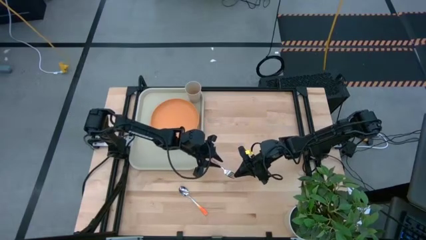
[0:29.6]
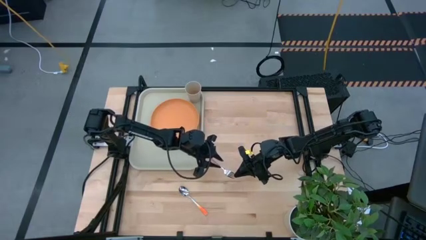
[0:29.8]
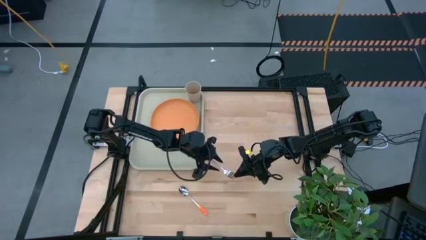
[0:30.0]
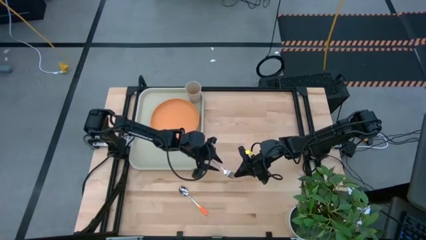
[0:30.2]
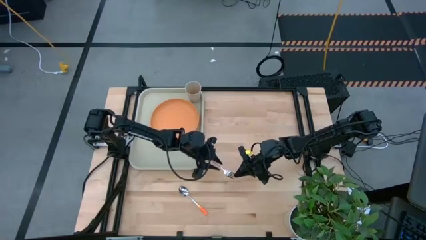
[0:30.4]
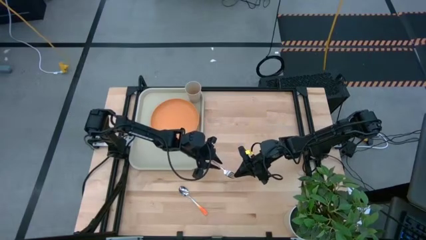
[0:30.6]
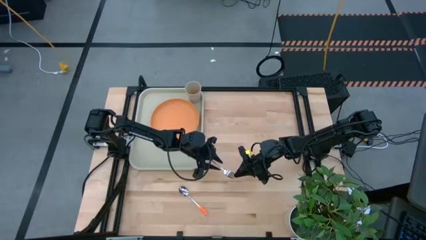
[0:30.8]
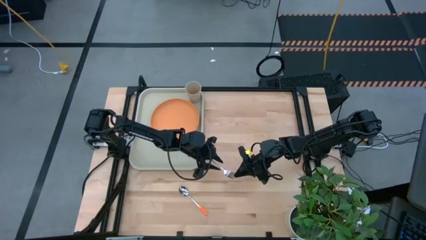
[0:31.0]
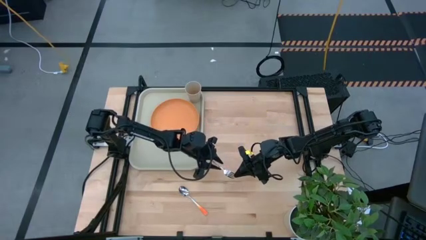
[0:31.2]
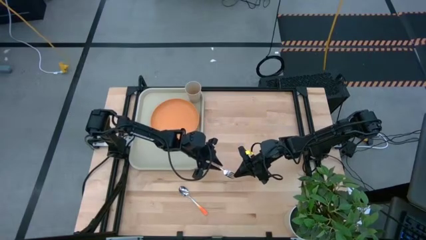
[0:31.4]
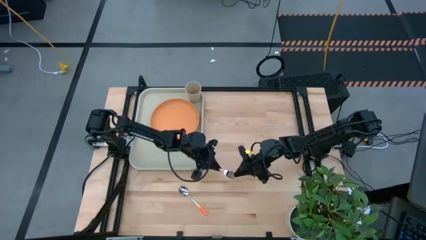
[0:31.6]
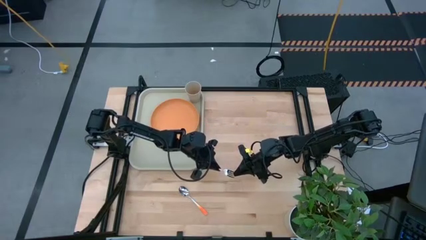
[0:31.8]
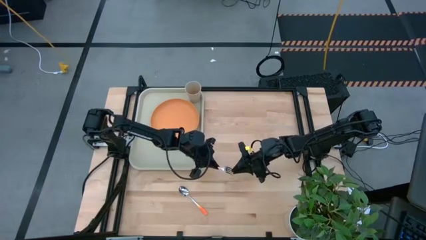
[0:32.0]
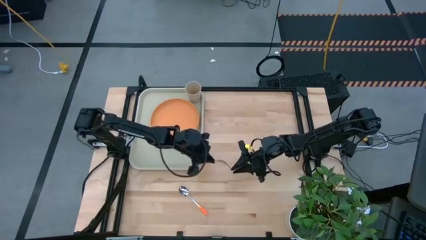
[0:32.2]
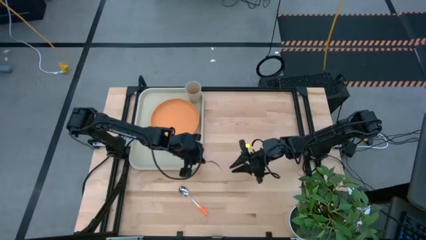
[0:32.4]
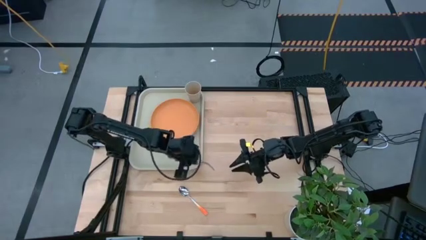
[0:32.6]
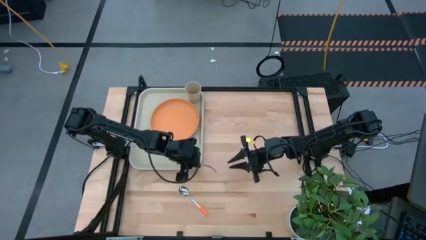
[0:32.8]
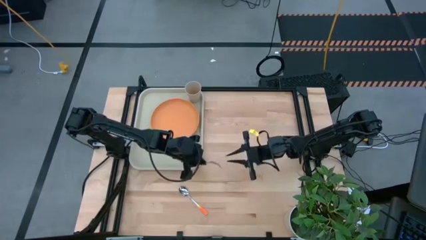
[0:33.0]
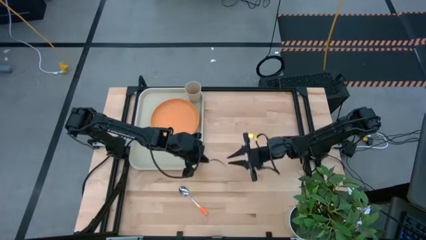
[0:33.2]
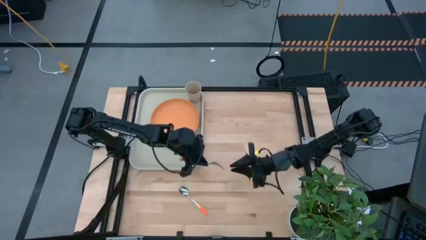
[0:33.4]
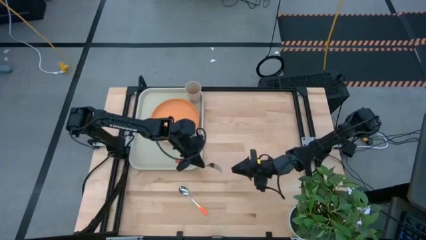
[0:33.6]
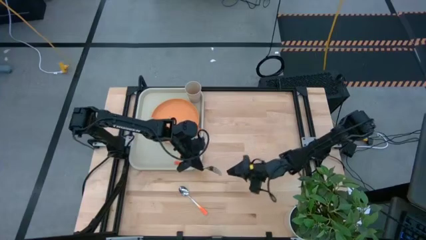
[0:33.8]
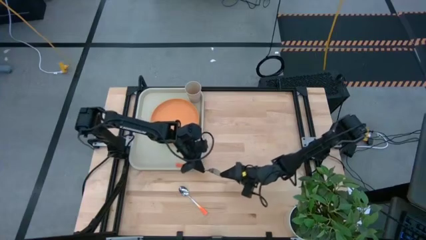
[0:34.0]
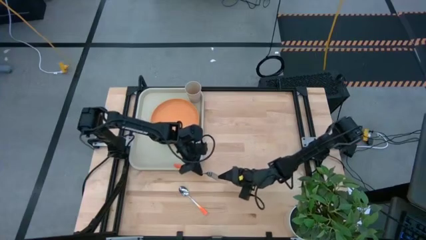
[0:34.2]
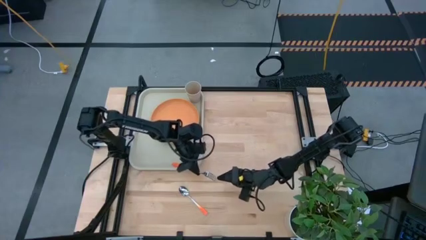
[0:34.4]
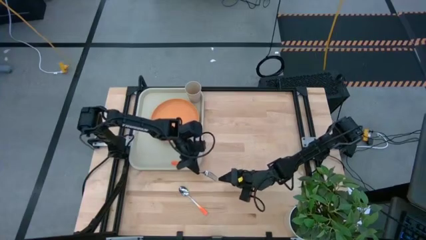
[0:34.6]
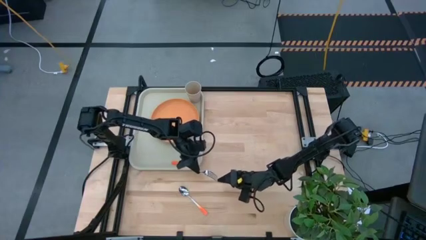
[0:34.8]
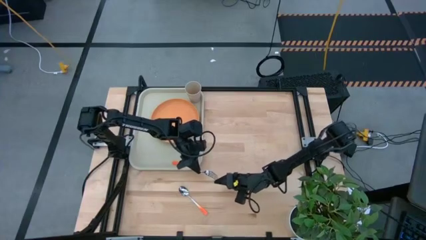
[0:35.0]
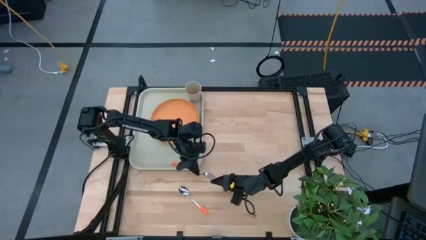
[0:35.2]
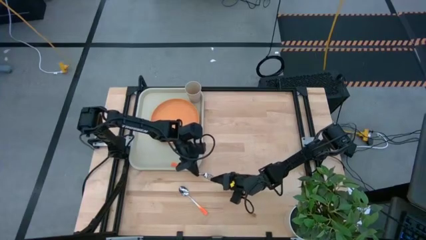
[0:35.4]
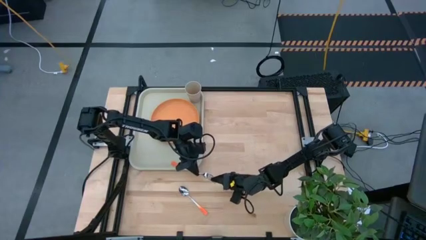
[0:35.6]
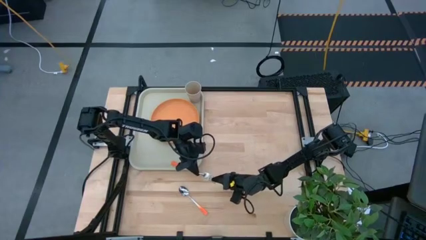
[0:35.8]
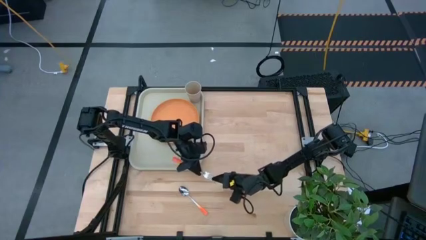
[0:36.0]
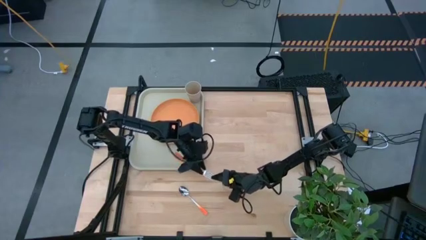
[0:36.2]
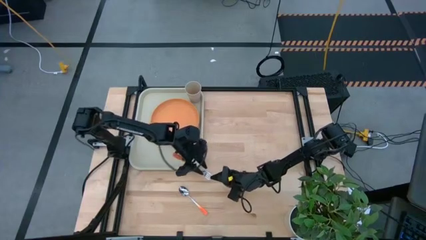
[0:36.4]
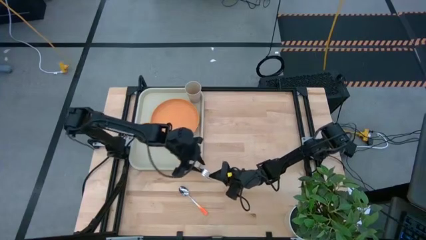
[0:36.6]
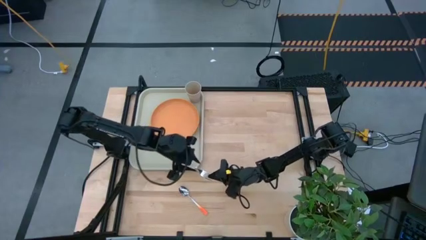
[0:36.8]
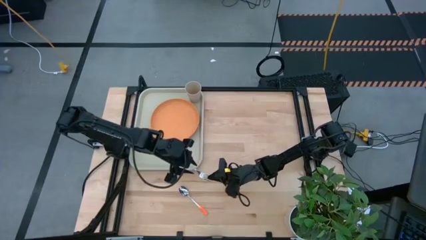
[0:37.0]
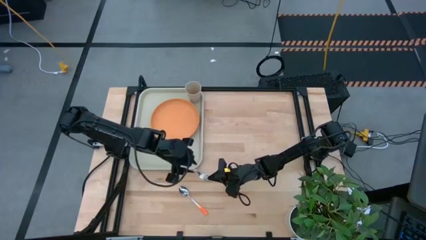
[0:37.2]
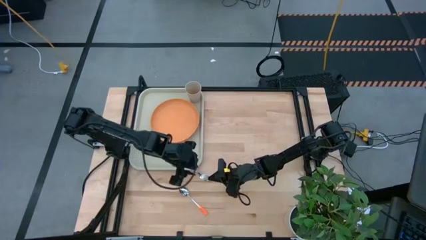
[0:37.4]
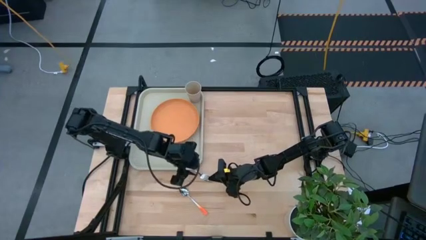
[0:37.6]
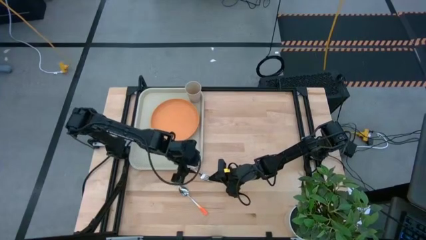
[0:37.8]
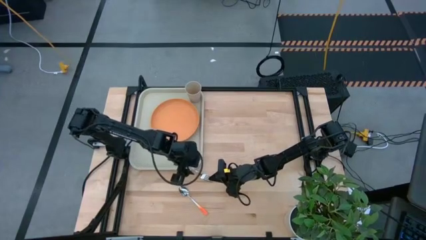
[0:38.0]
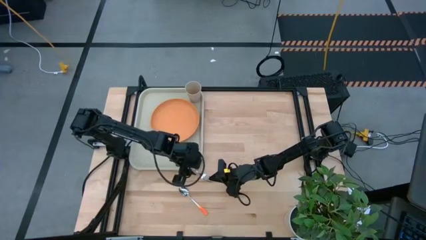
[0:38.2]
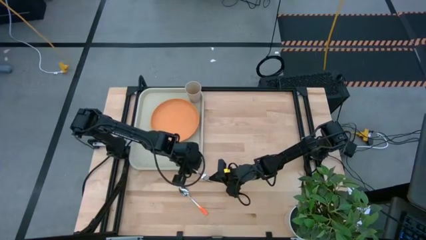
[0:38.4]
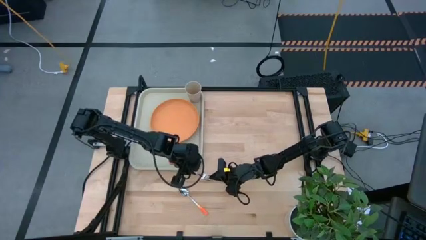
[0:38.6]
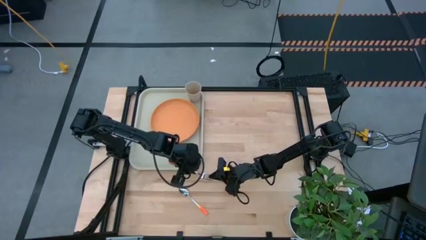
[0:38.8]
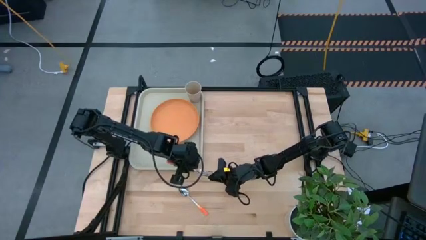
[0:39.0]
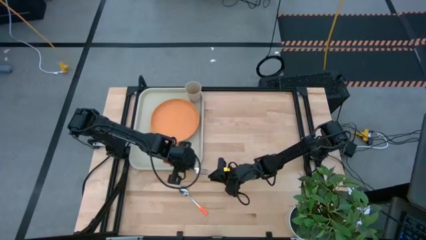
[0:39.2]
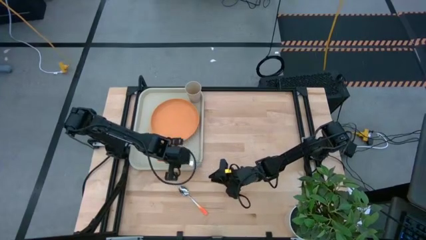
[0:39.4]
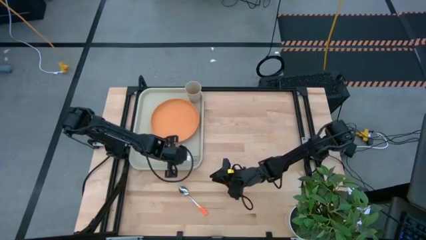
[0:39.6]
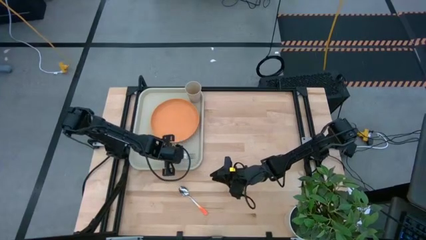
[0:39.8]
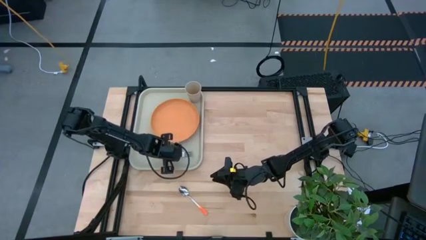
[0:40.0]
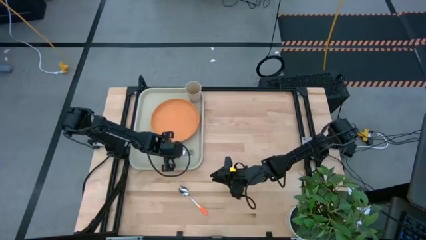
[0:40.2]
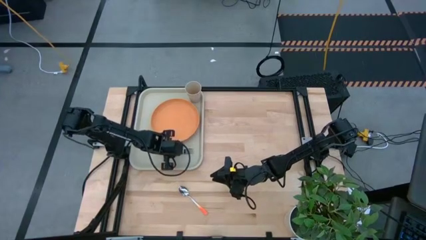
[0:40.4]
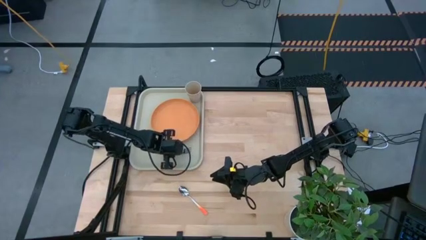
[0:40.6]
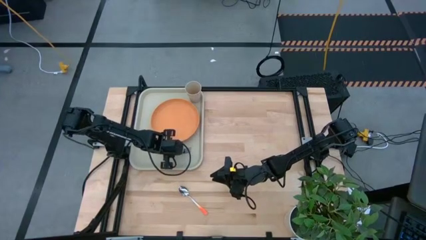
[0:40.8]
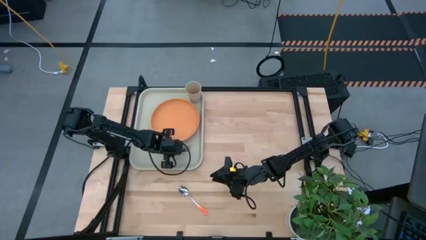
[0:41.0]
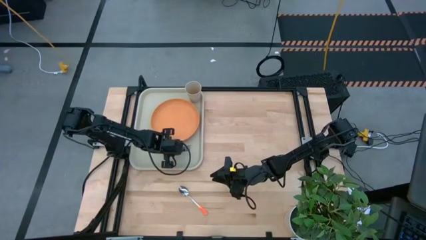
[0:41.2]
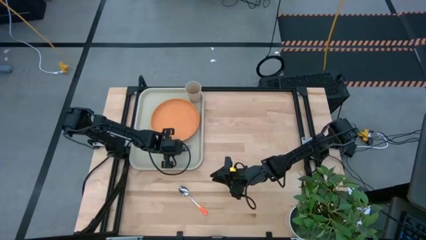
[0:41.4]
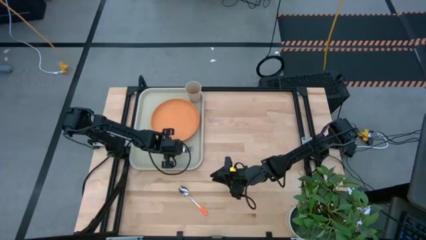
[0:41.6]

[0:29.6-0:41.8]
Task: Pick and place plate/cup/fork/spoon on tray
Put the orange fork on the light brown tray
